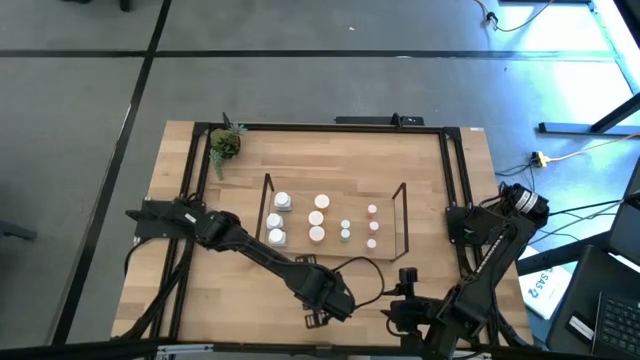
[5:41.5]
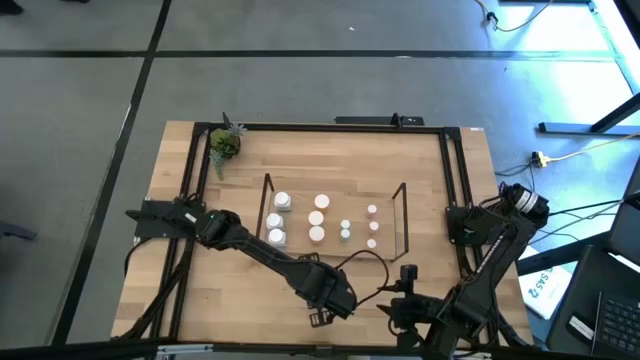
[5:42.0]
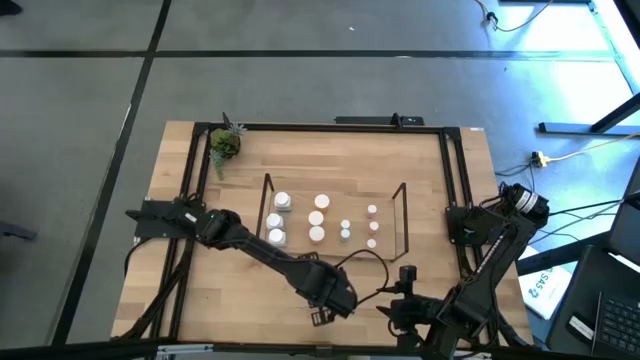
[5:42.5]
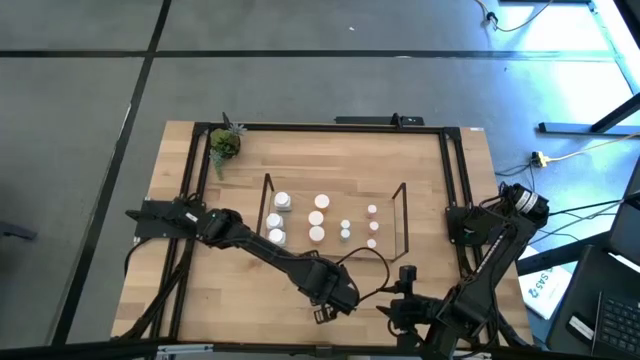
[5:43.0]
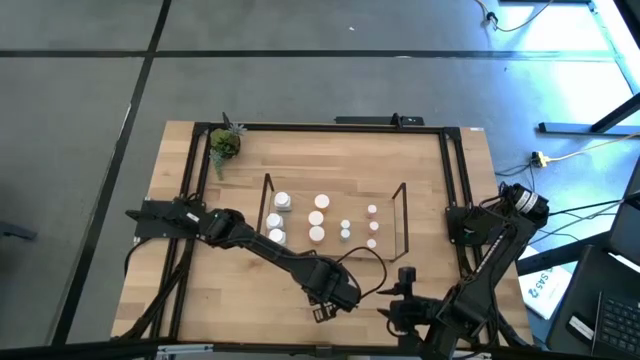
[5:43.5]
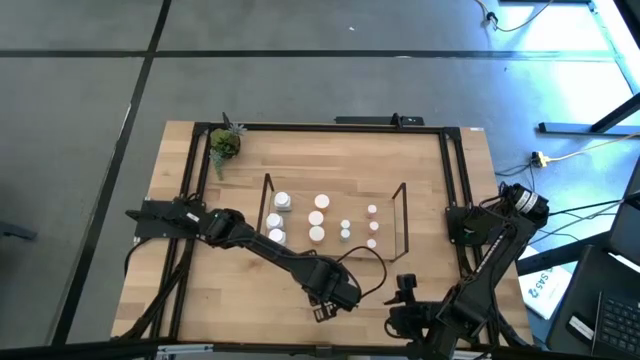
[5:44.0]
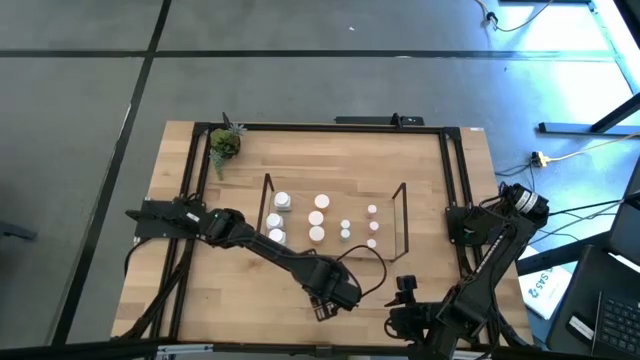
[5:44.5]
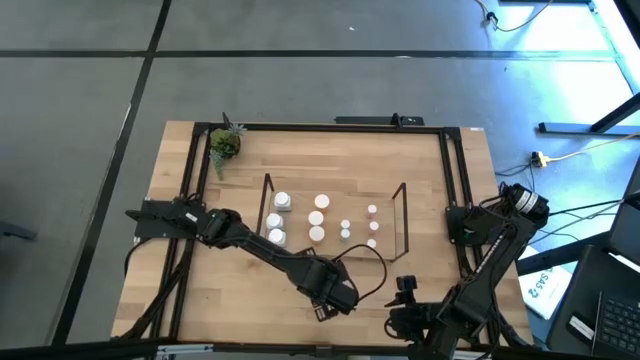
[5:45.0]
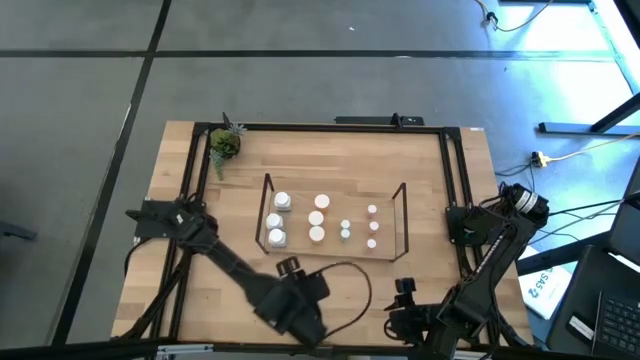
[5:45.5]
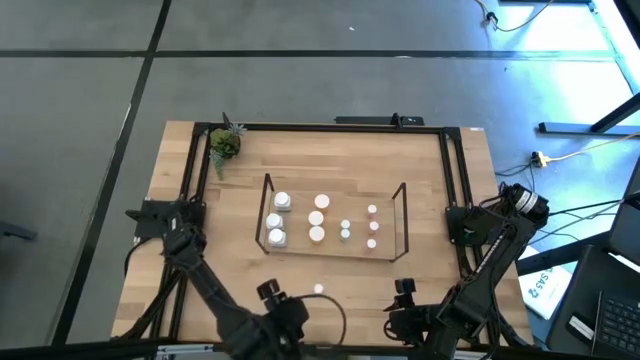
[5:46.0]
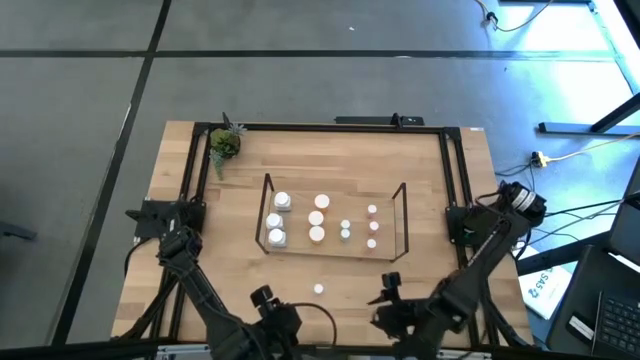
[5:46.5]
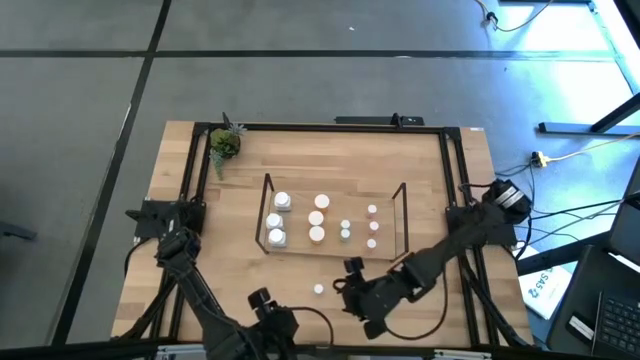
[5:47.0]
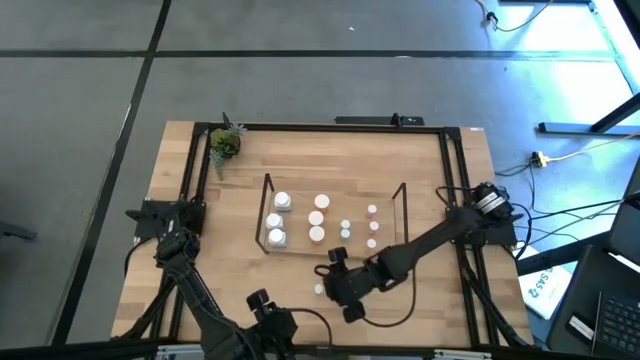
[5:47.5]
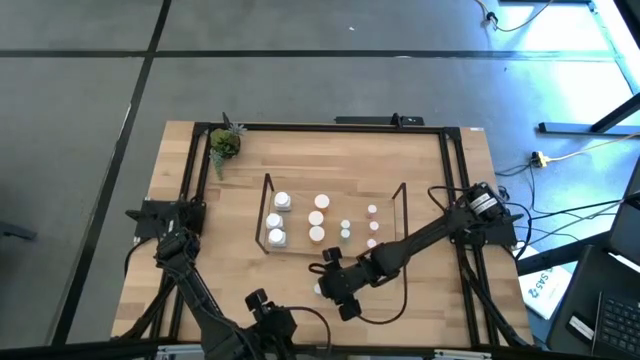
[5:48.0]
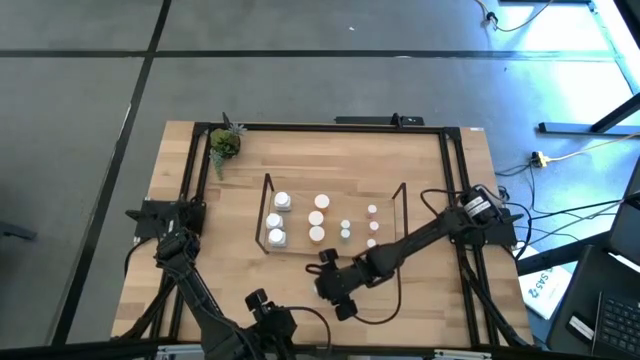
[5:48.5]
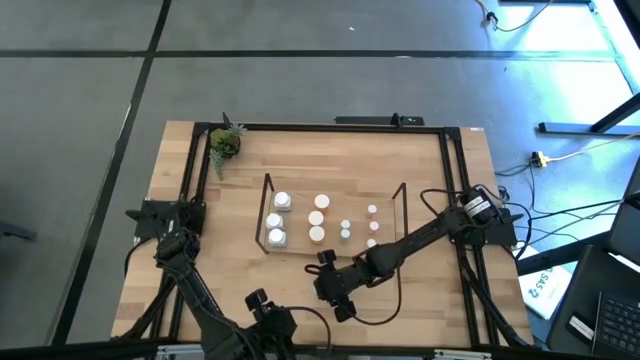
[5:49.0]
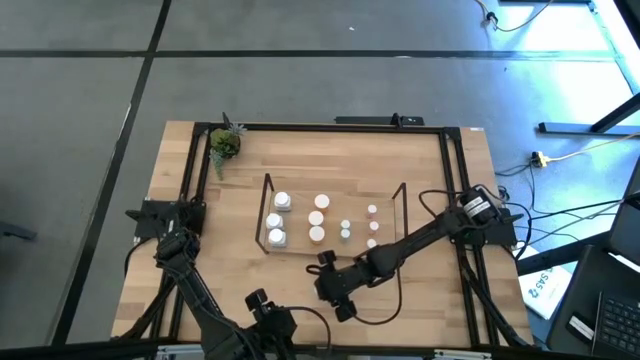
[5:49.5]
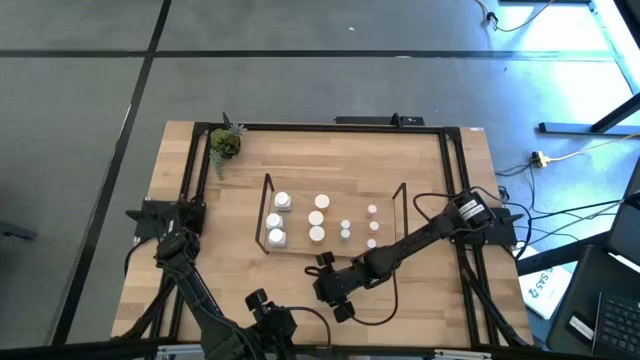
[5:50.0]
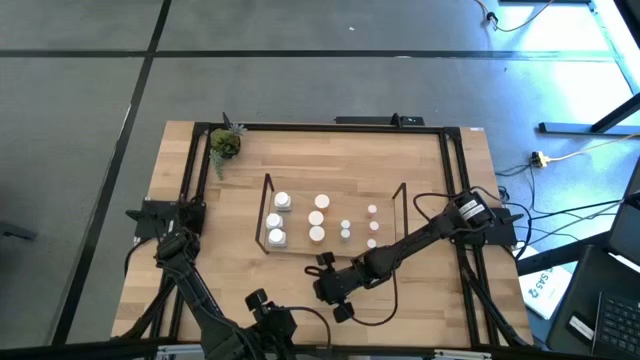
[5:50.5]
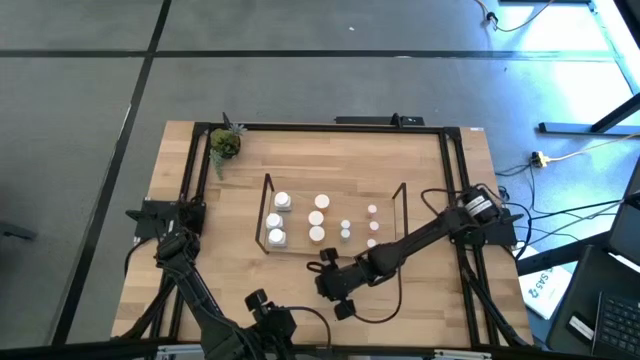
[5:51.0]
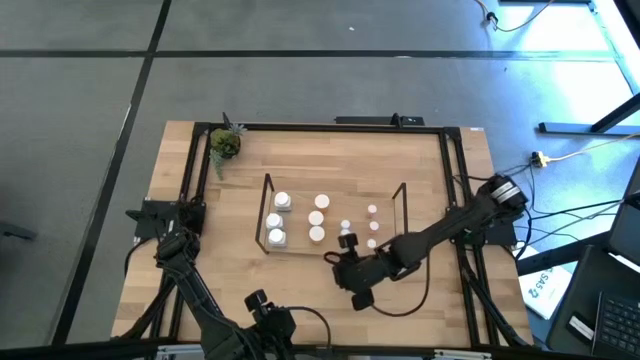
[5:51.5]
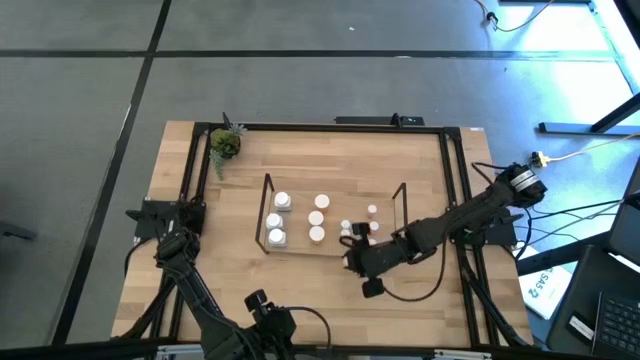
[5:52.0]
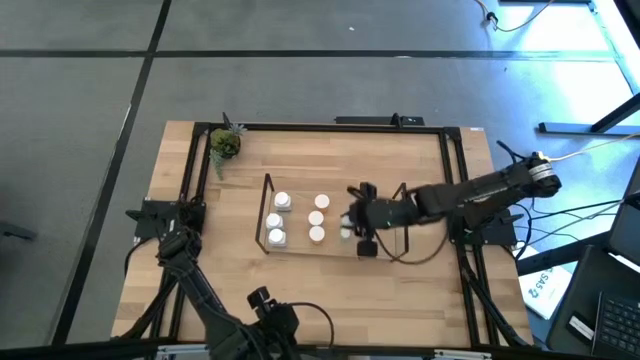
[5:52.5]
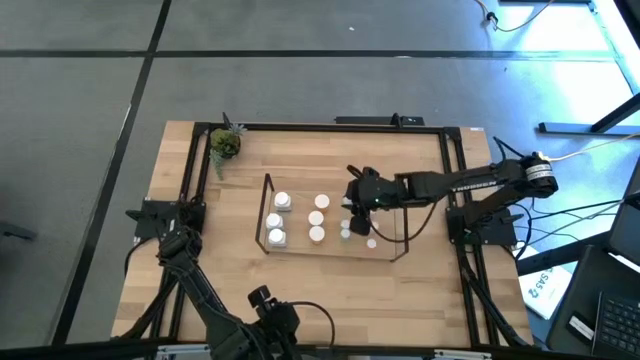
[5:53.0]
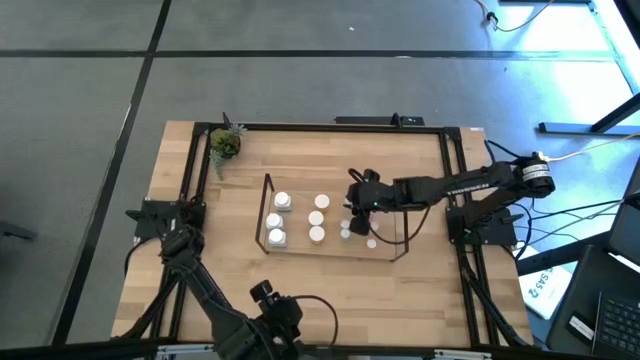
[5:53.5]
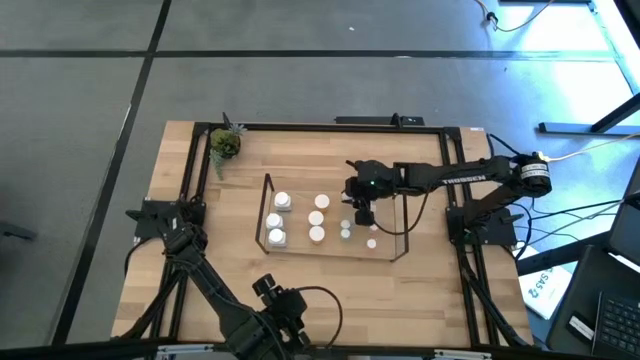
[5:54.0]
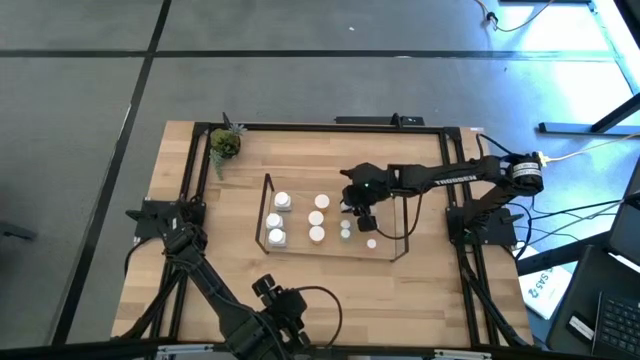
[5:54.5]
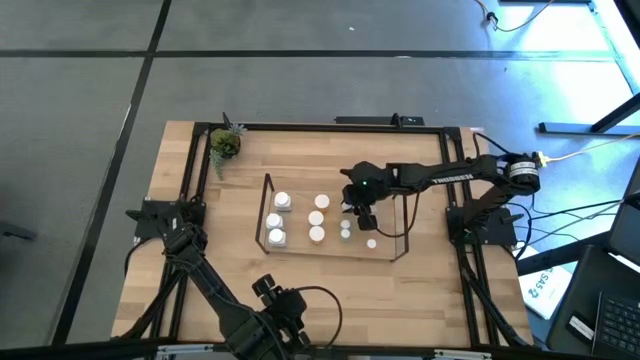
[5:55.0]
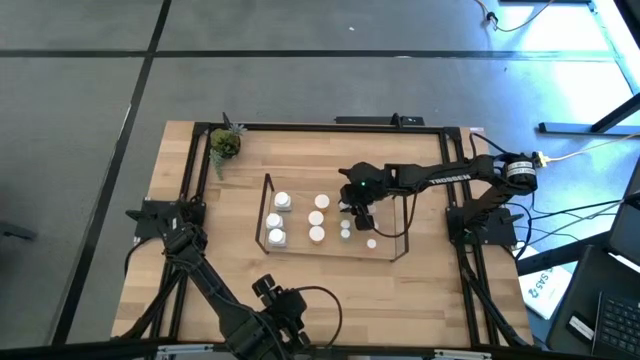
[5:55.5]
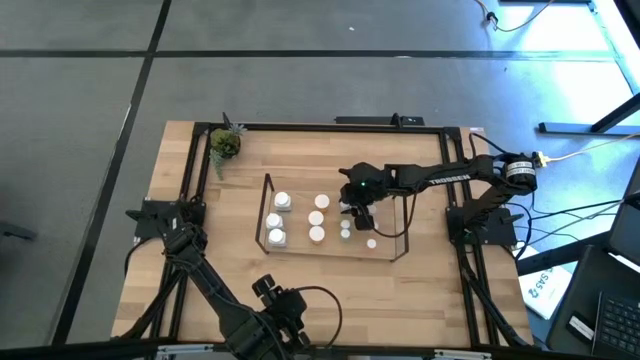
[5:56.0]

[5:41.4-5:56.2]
Task: Pick and place medicine bottles onto shelf by color
Put the light blue pill bottle on the shelf aligned with the other light blue pill bottle

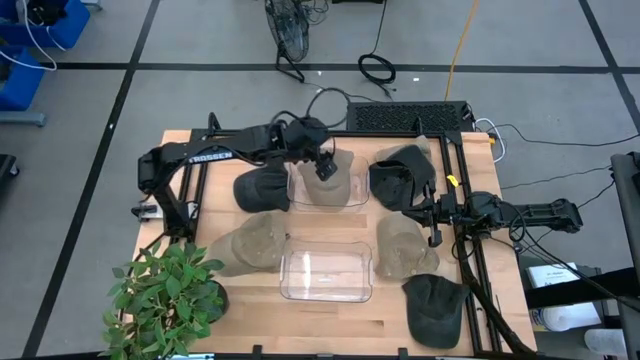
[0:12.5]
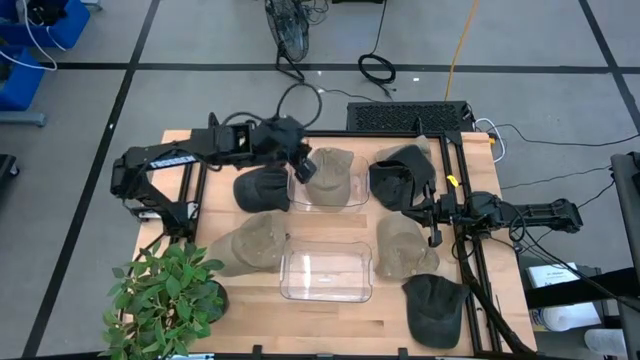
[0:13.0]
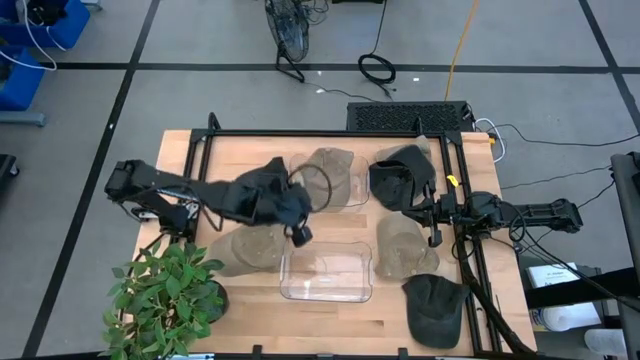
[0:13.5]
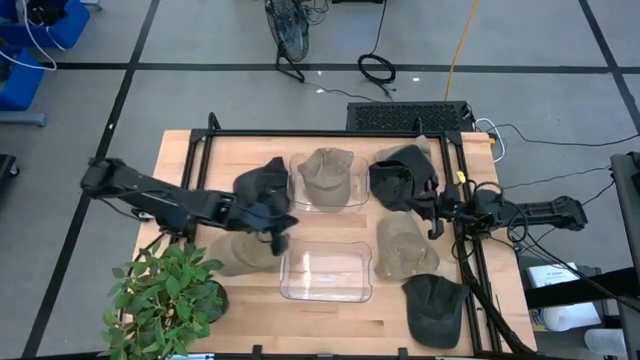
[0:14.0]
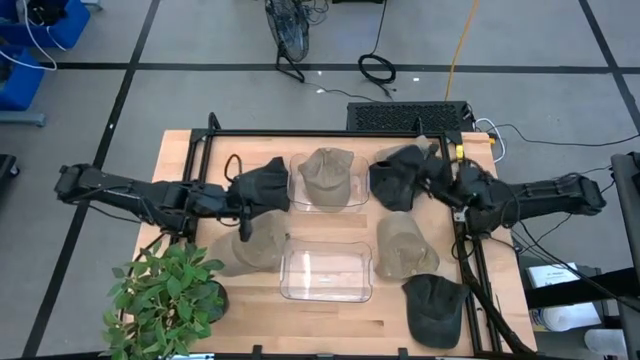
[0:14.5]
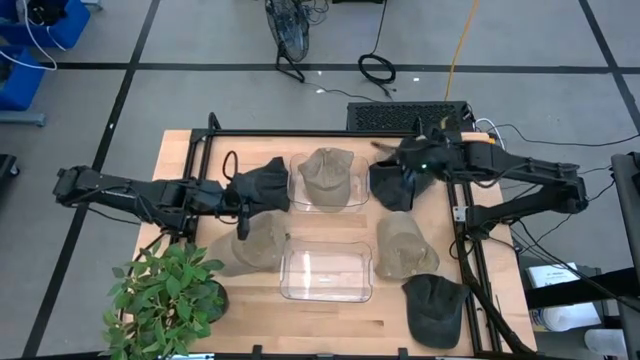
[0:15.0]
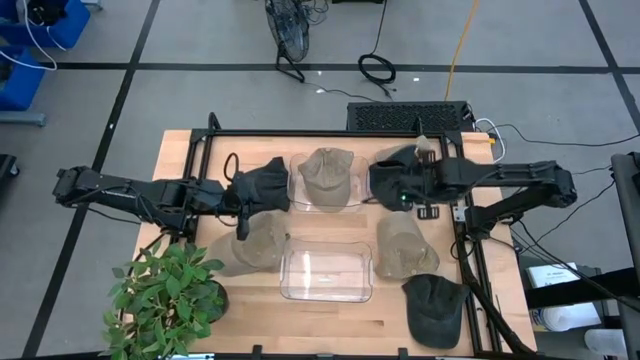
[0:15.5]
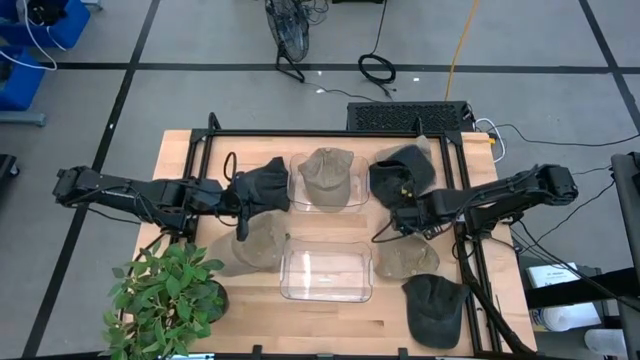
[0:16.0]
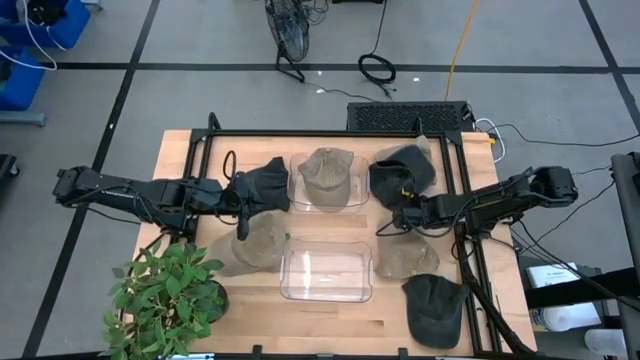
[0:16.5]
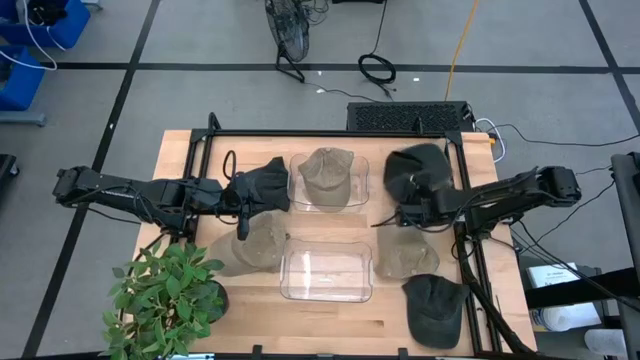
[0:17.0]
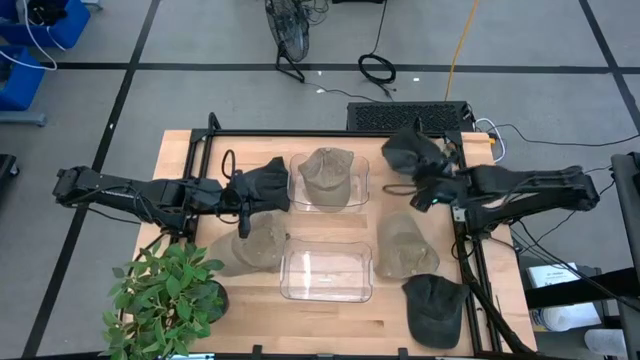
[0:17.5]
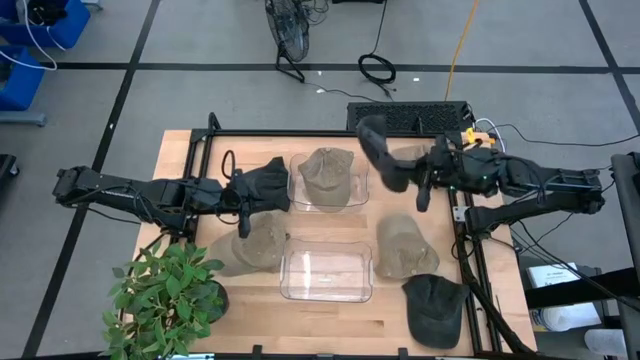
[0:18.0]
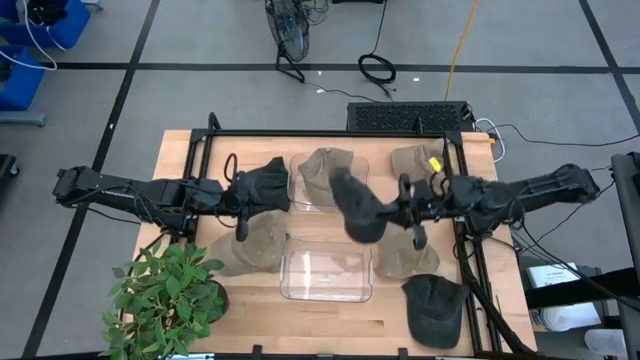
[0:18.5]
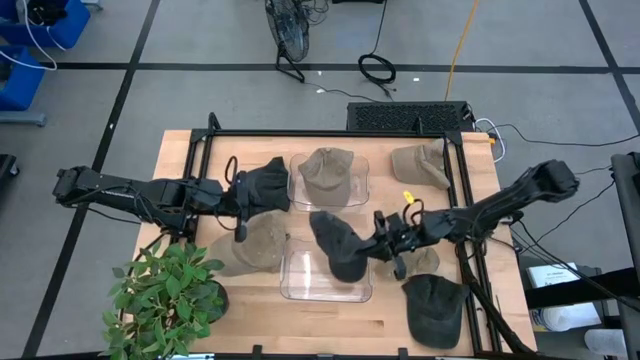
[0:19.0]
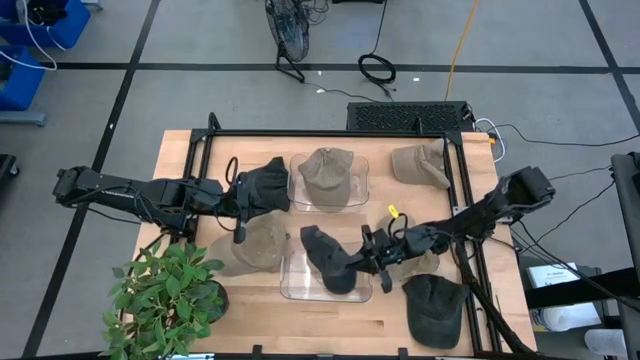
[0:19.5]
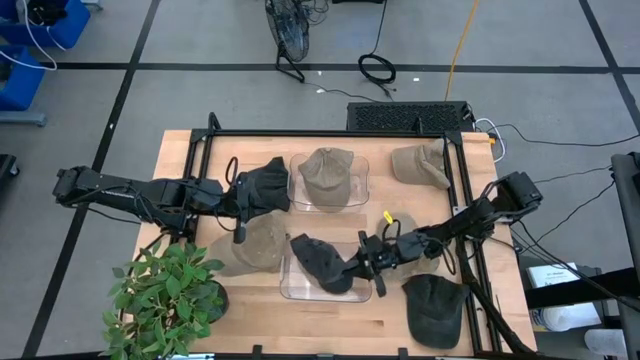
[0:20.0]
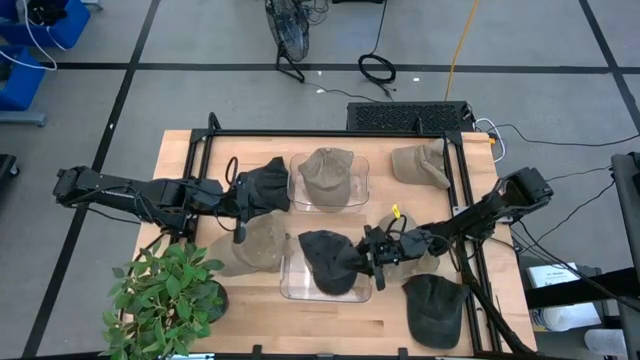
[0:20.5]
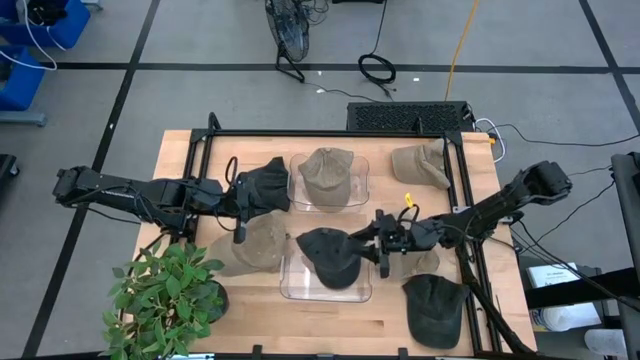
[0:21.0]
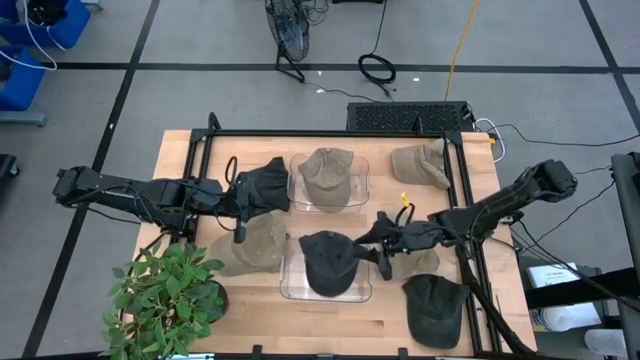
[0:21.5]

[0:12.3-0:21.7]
Task: Pick & Place hat
Put the black cap into the bottom transparent bin
